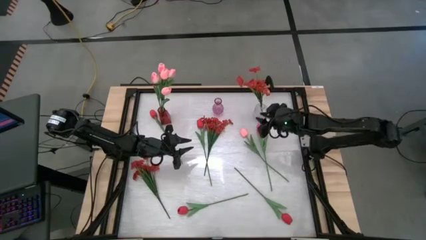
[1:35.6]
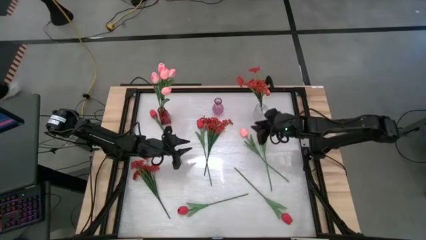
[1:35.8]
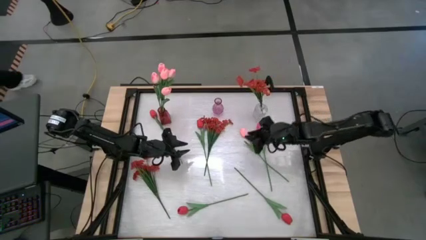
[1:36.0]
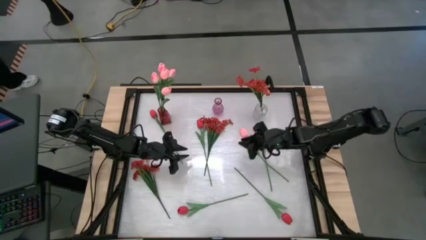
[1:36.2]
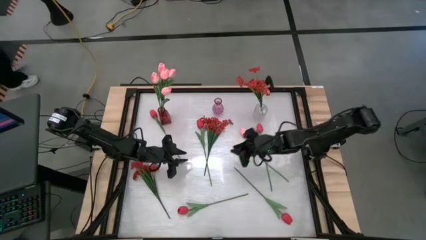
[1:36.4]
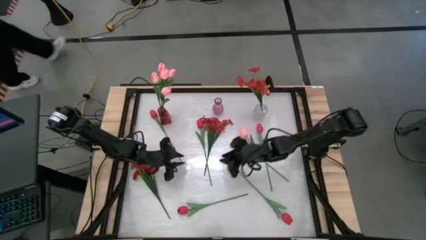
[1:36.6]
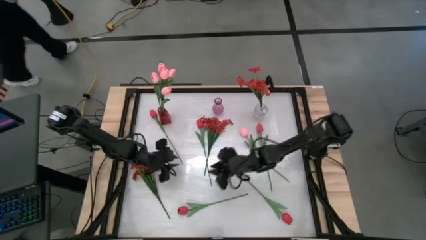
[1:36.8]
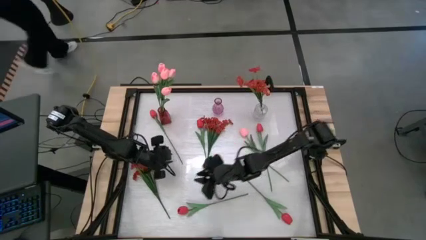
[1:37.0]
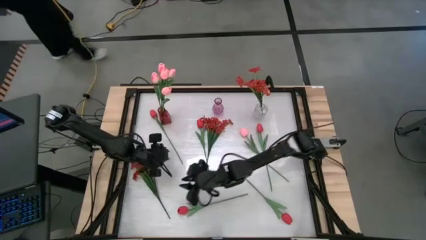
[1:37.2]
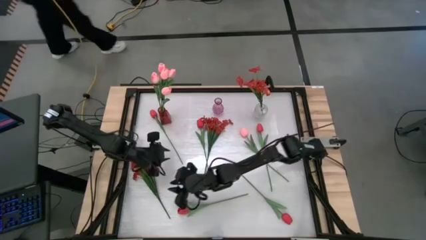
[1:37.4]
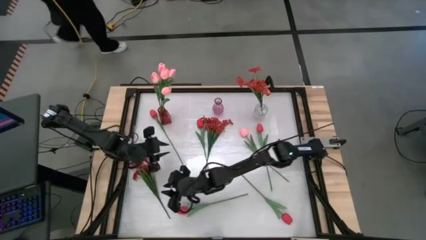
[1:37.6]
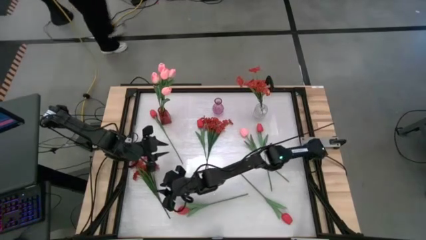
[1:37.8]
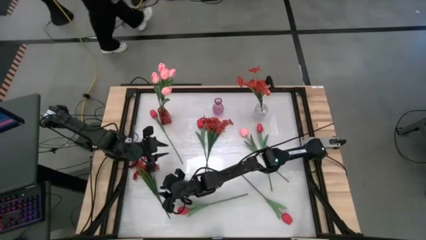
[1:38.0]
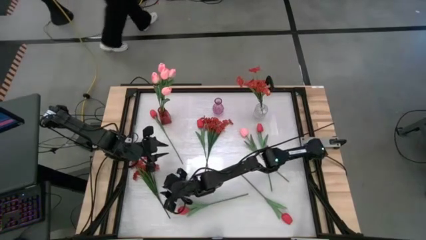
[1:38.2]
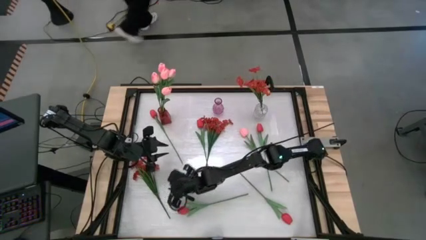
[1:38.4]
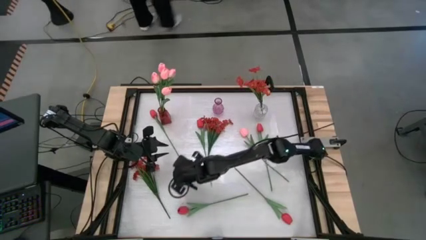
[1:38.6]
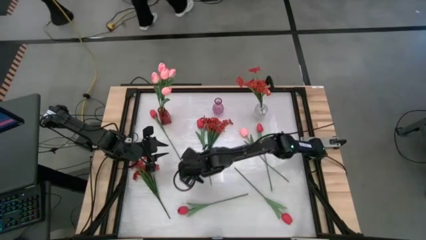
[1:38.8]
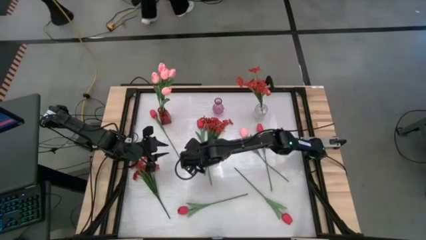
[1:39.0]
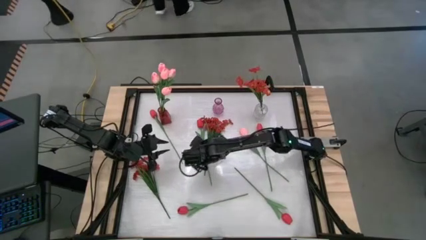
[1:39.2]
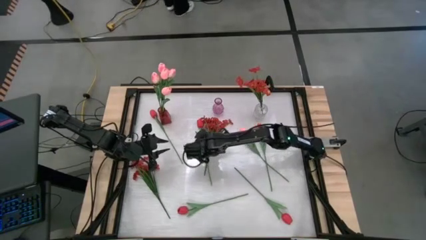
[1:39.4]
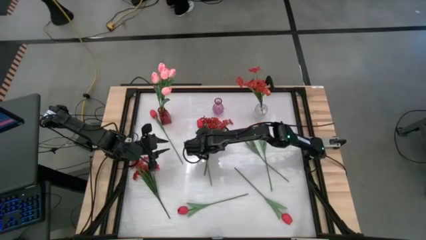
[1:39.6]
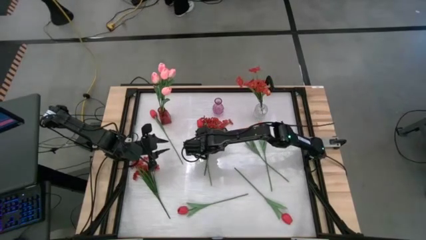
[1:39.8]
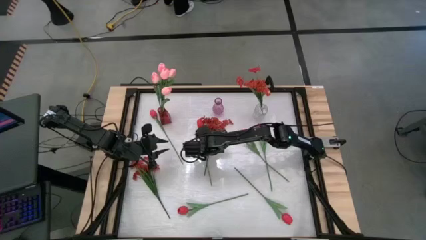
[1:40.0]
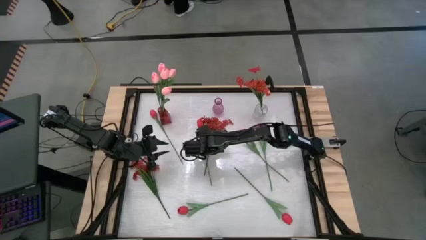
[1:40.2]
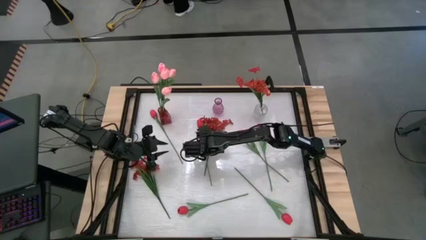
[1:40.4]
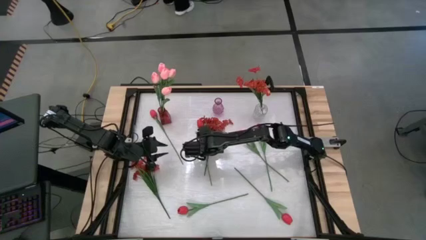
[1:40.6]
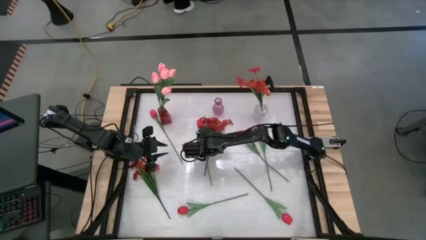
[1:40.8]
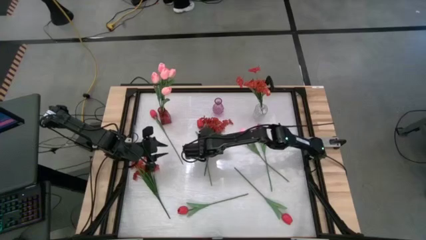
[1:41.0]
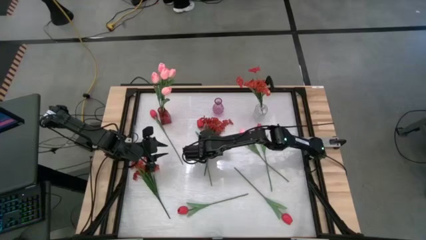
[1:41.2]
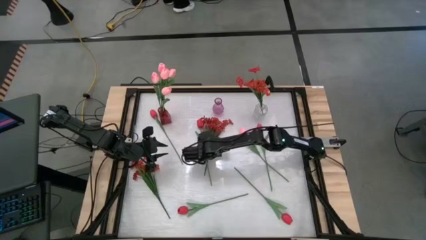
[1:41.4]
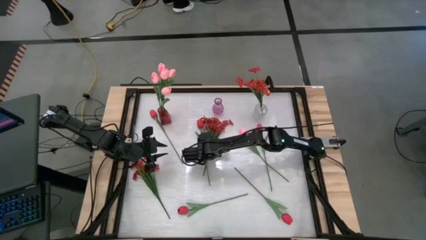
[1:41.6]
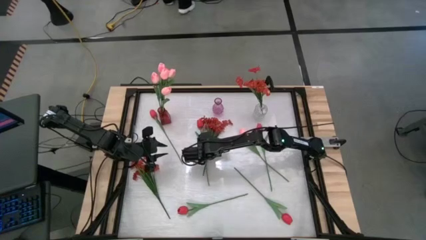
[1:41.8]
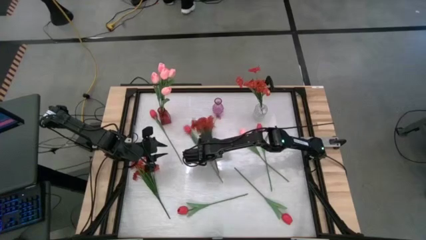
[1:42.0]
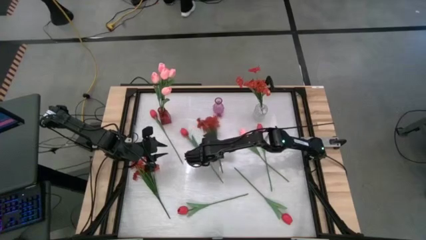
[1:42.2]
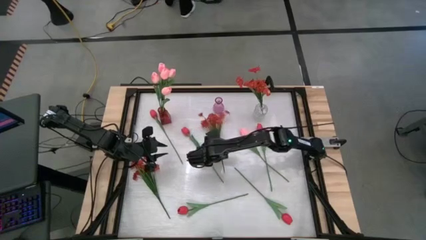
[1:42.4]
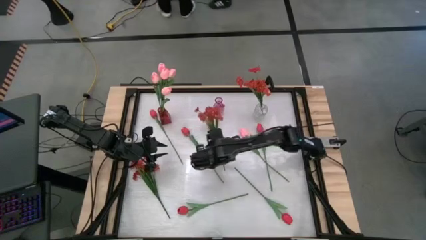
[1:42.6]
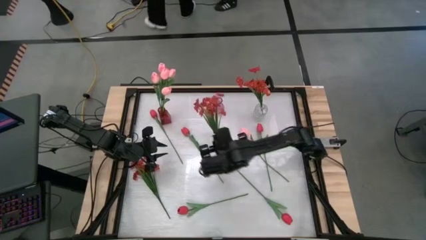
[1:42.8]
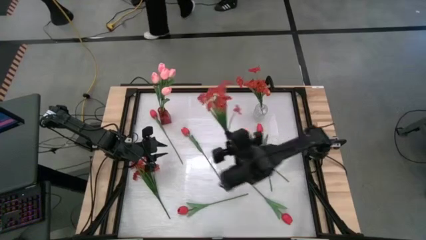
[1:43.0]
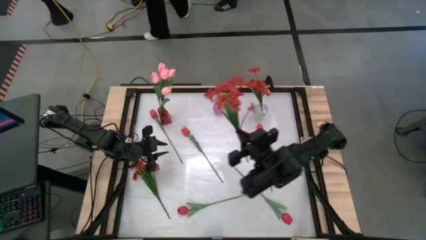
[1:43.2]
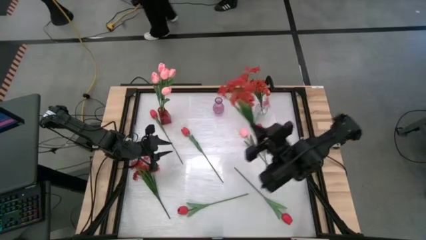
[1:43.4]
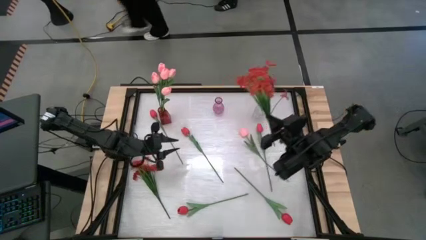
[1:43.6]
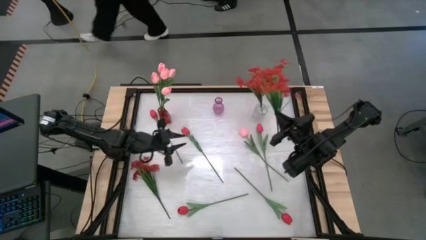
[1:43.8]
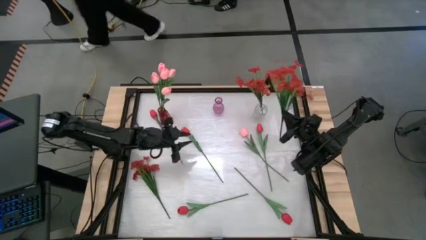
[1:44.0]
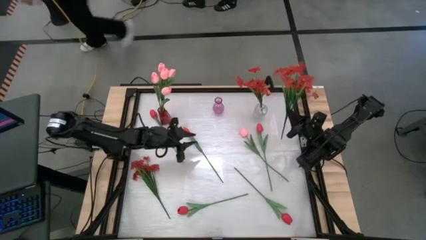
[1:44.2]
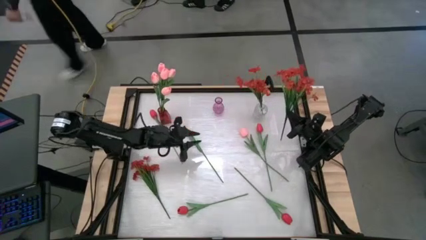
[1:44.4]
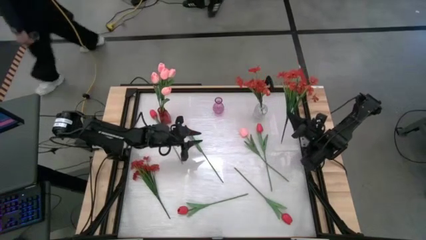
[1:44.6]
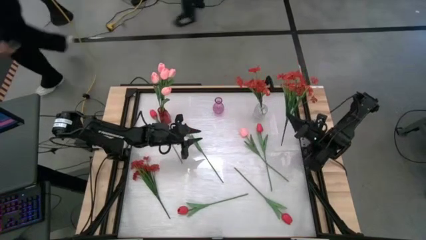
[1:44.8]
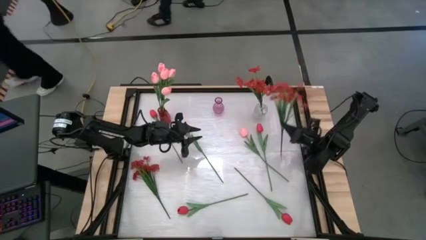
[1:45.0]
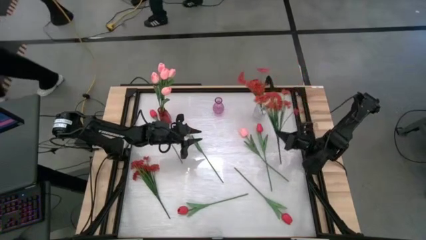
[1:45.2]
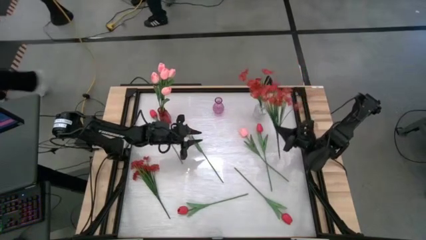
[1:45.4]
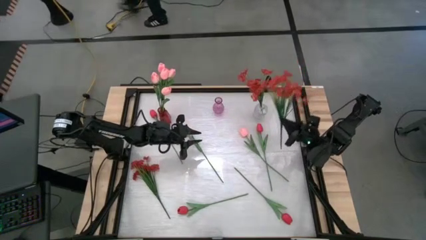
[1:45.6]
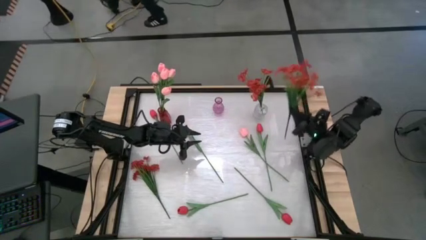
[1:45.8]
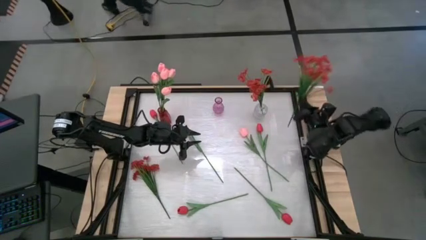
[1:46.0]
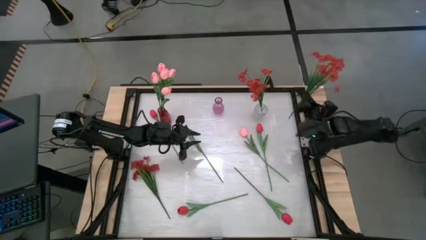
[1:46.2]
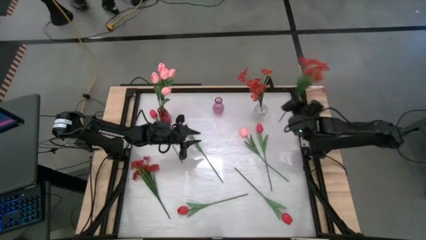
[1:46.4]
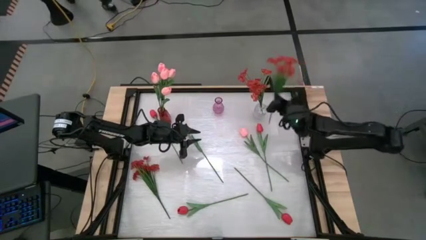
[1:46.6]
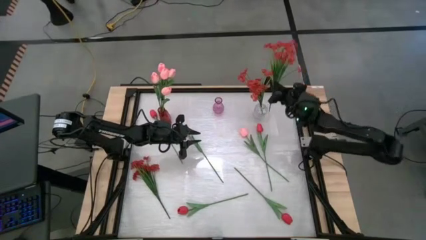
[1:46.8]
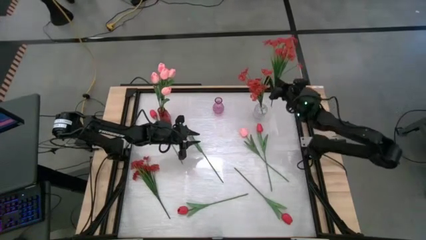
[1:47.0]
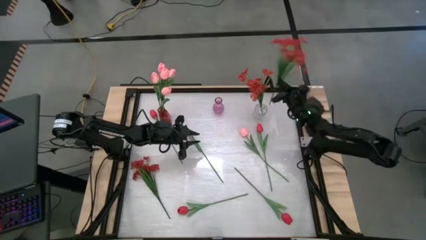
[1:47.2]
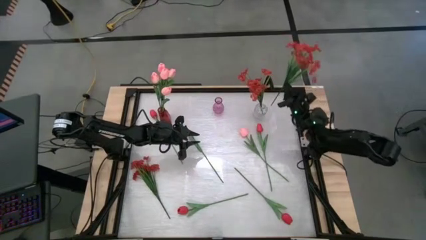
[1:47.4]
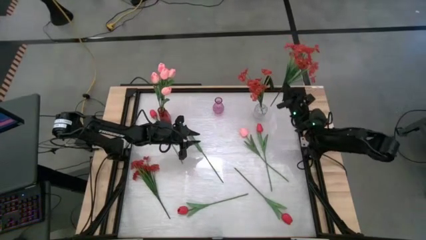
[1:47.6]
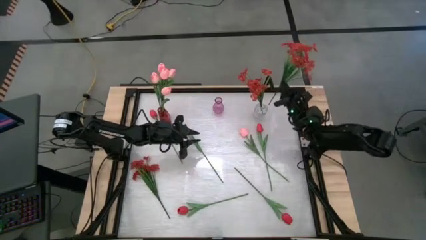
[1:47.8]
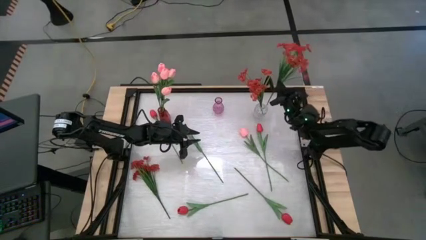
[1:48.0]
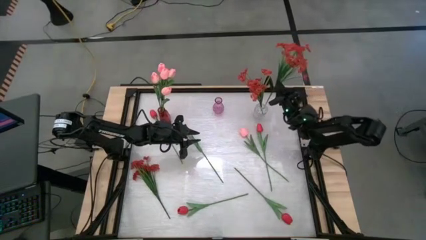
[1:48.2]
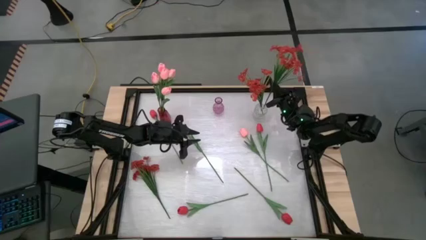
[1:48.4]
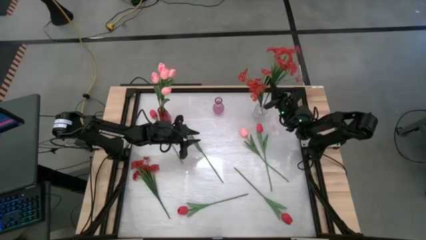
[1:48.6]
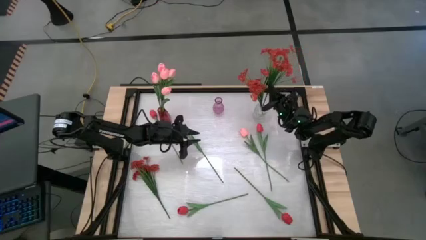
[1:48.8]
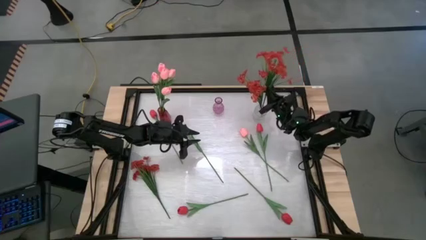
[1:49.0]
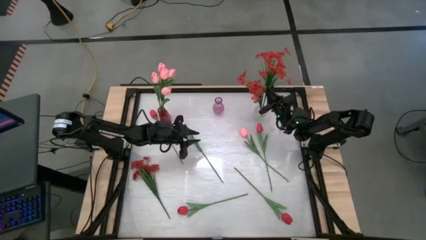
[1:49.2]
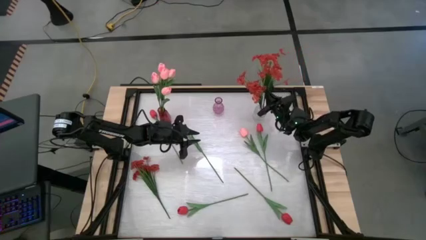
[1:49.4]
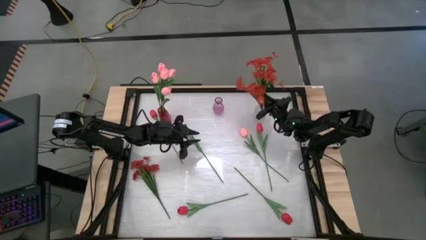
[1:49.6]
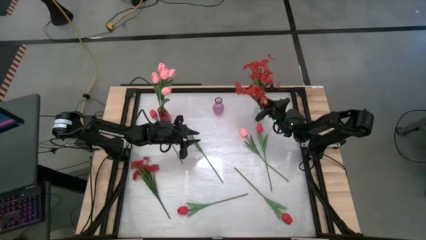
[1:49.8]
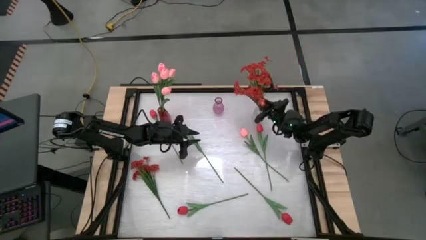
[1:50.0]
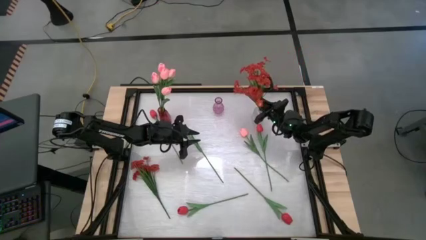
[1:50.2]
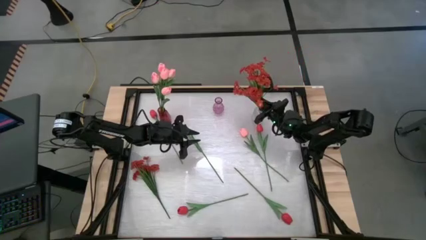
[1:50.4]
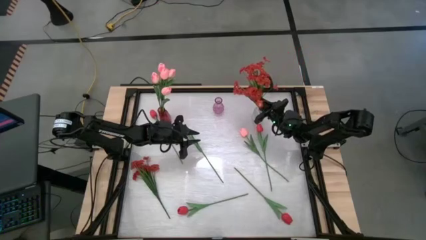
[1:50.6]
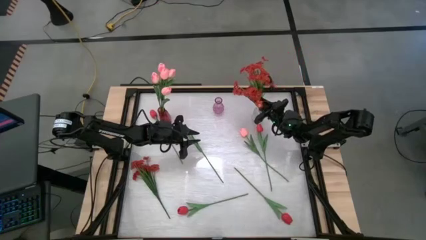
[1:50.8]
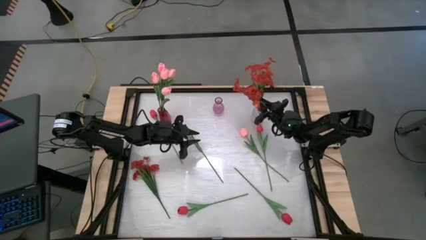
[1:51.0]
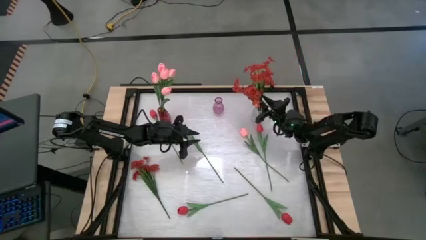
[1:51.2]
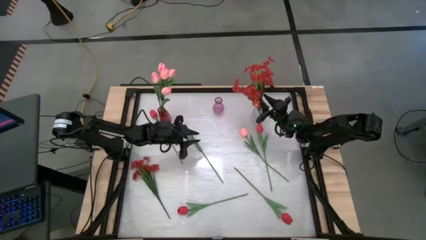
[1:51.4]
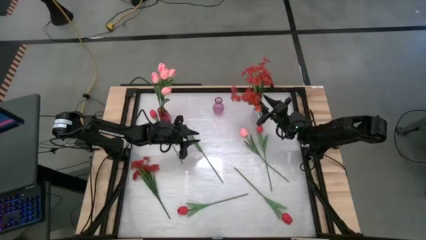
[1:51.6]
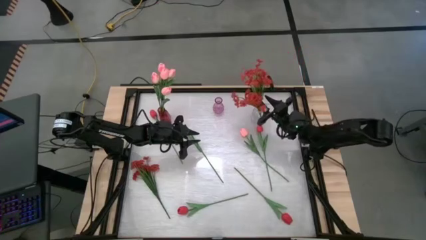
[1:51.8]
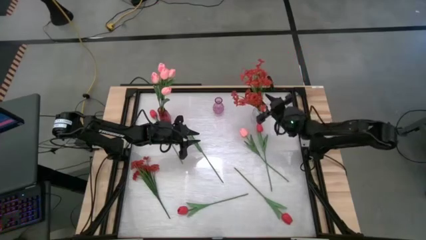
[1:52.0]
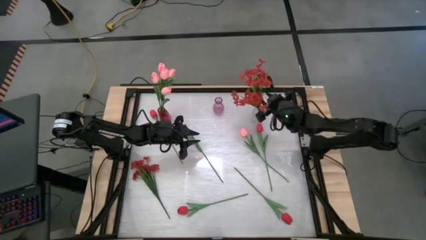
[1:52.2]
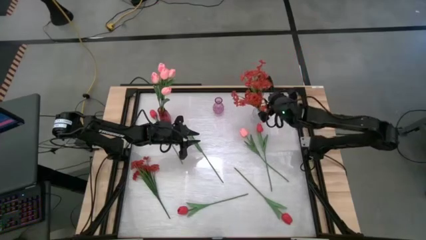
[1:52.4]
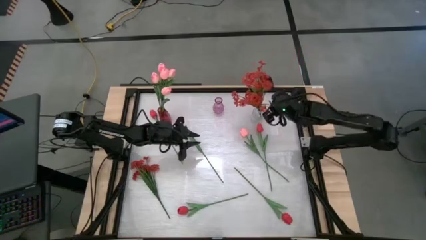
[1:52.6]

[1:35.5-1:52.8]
Task: Sort flowers into vase by color
Put the red flowers into the transparent vase
